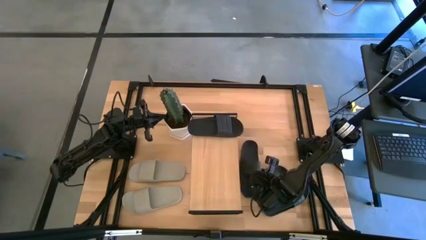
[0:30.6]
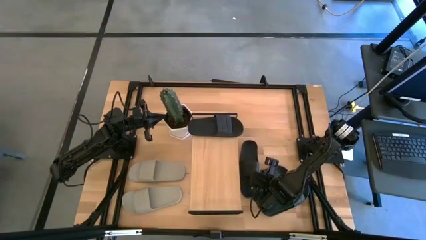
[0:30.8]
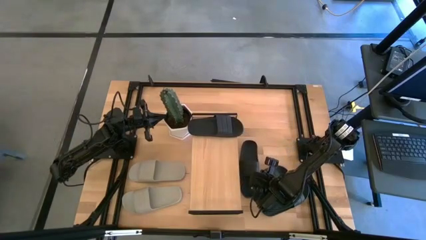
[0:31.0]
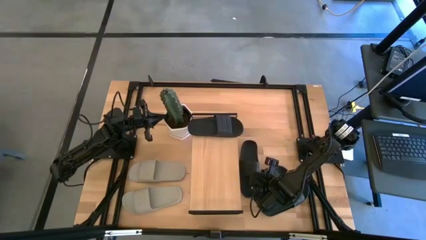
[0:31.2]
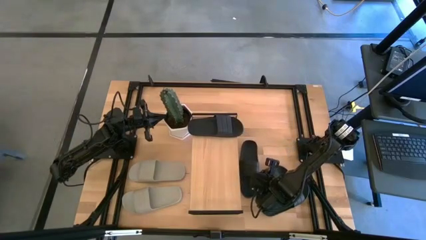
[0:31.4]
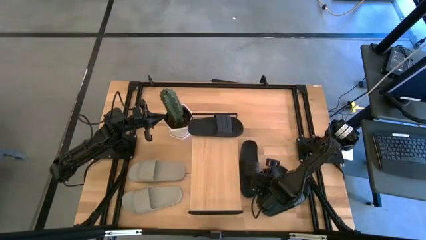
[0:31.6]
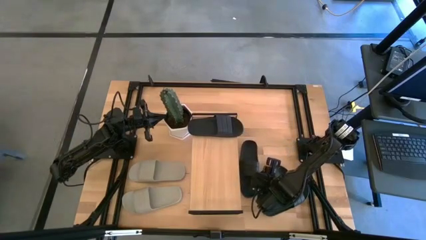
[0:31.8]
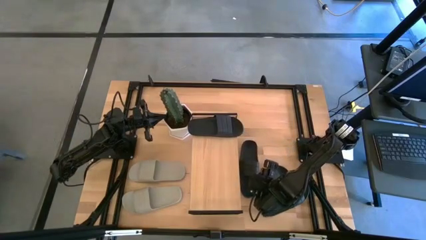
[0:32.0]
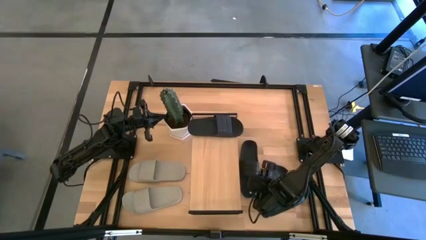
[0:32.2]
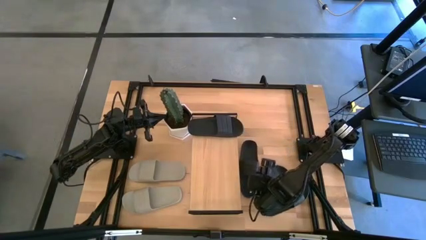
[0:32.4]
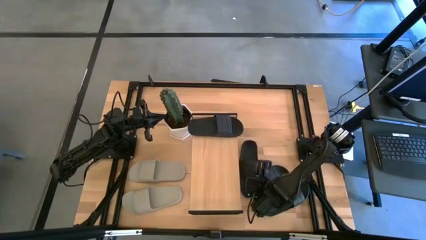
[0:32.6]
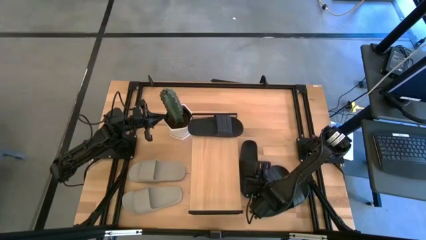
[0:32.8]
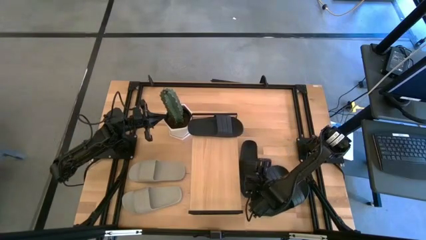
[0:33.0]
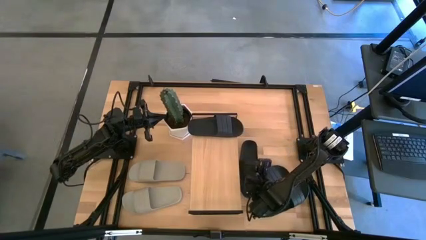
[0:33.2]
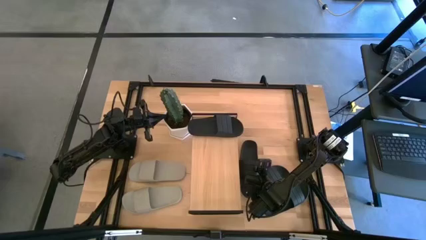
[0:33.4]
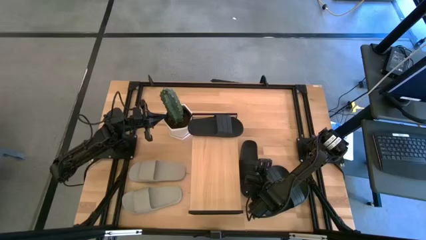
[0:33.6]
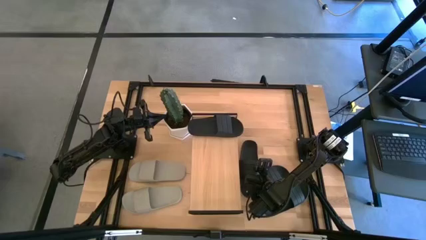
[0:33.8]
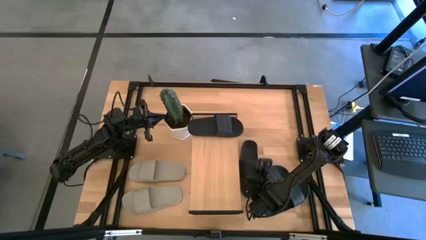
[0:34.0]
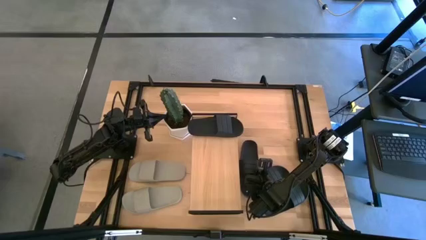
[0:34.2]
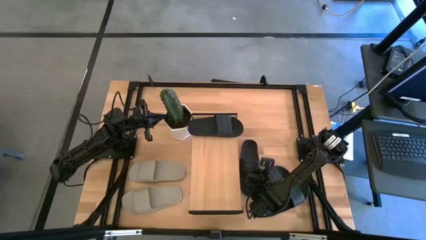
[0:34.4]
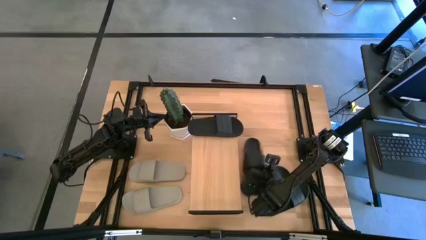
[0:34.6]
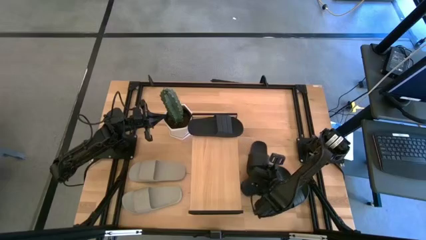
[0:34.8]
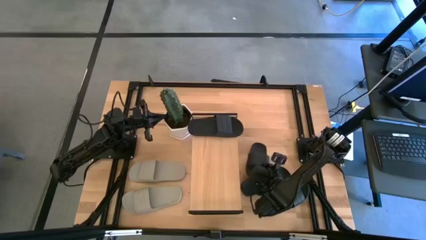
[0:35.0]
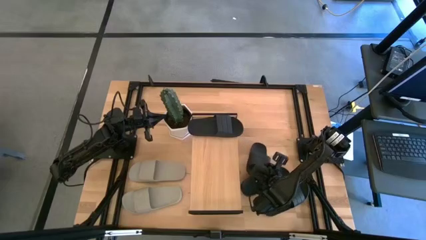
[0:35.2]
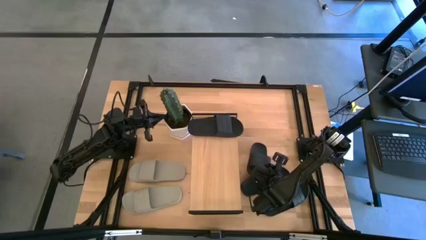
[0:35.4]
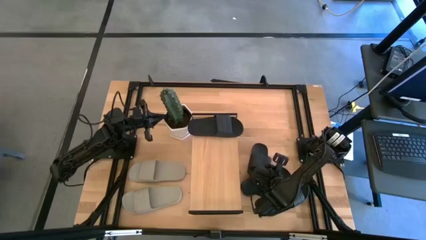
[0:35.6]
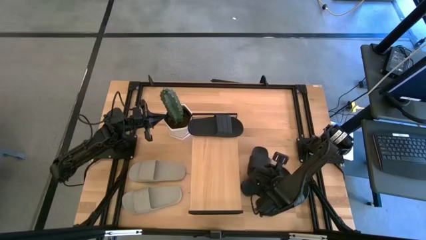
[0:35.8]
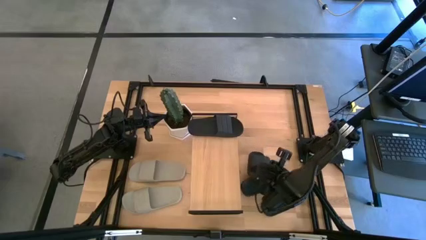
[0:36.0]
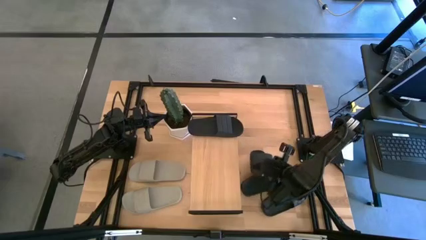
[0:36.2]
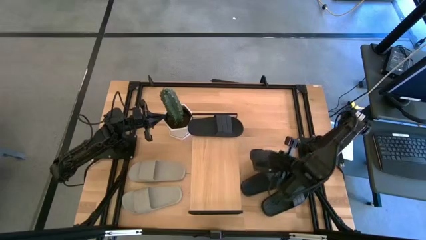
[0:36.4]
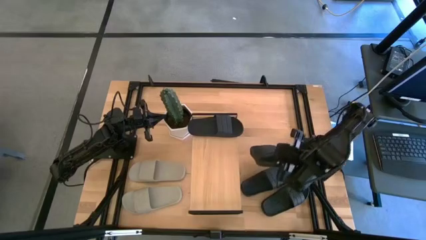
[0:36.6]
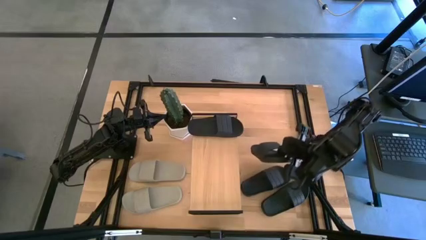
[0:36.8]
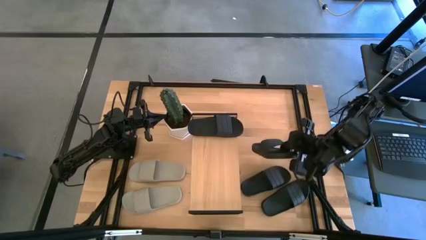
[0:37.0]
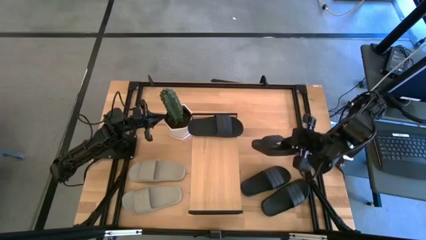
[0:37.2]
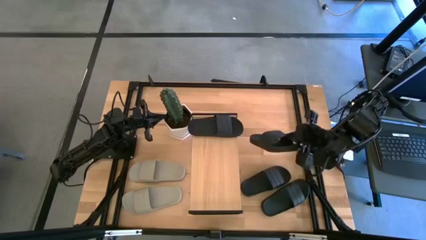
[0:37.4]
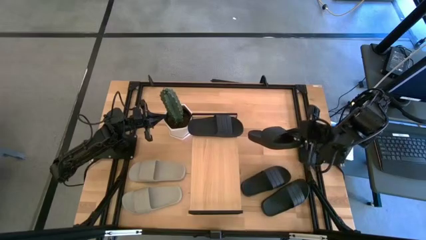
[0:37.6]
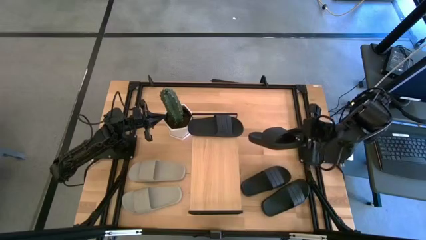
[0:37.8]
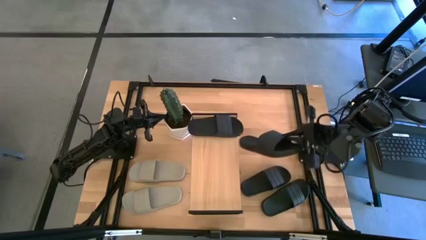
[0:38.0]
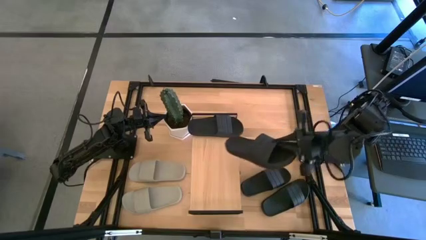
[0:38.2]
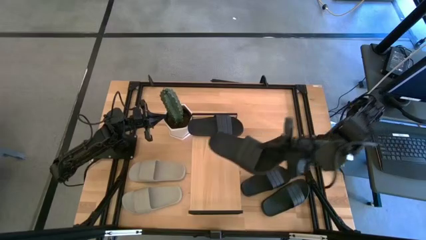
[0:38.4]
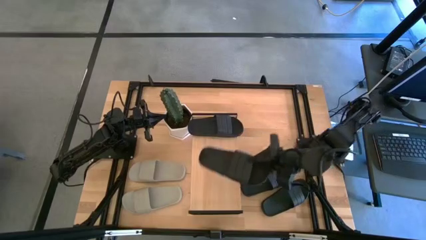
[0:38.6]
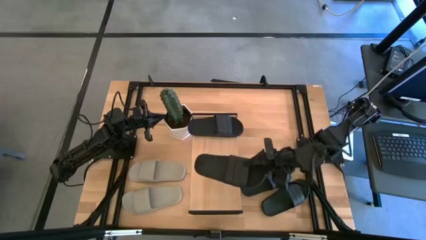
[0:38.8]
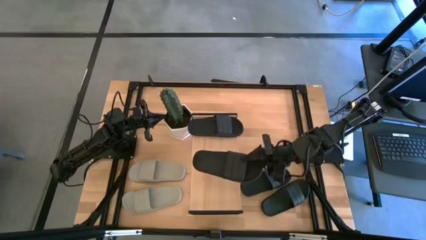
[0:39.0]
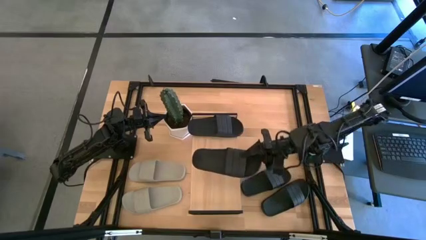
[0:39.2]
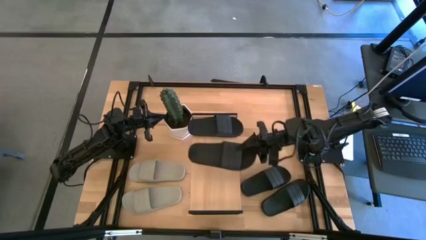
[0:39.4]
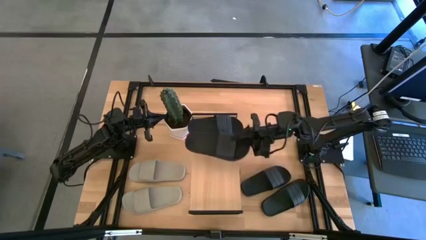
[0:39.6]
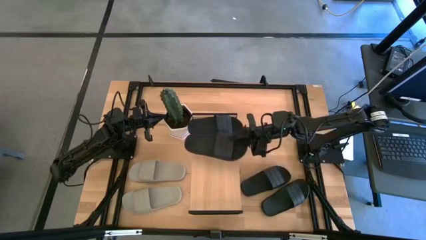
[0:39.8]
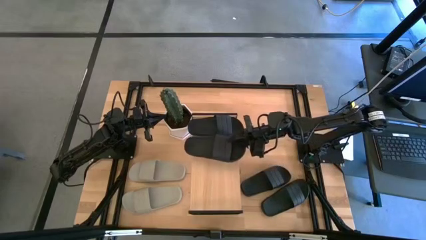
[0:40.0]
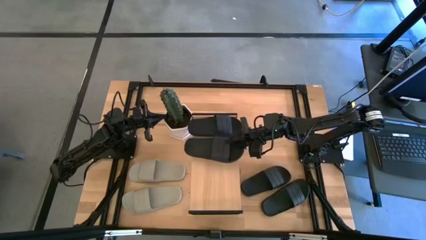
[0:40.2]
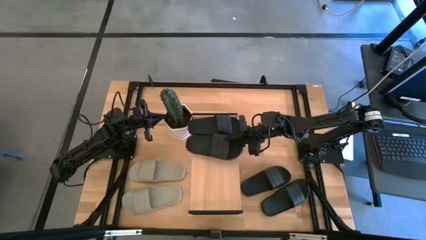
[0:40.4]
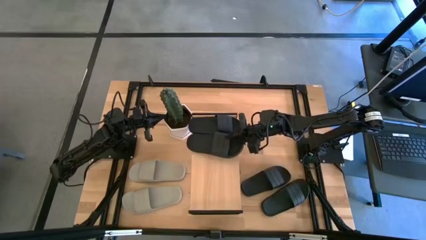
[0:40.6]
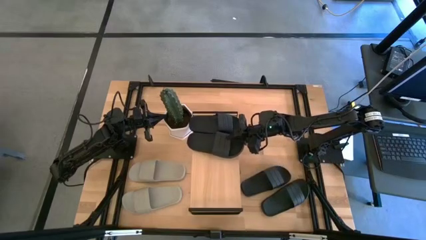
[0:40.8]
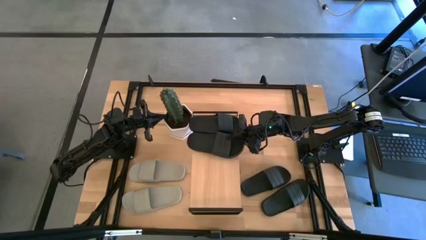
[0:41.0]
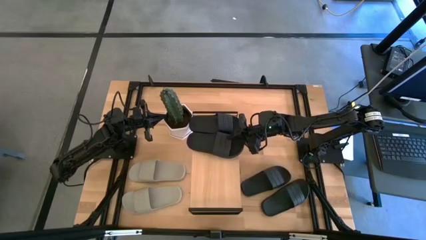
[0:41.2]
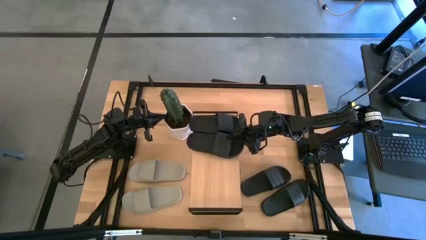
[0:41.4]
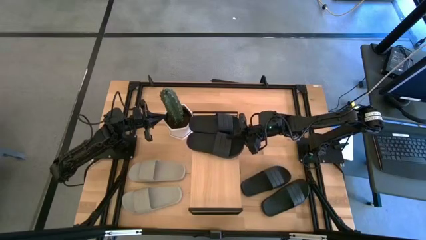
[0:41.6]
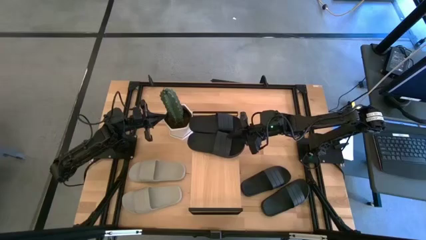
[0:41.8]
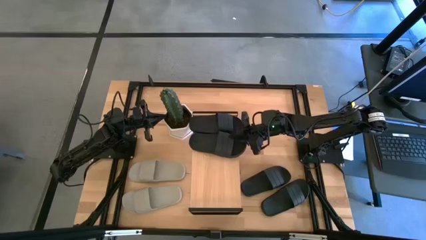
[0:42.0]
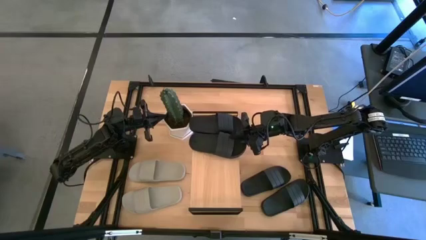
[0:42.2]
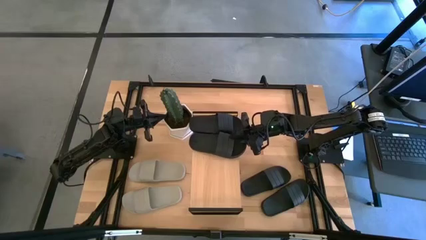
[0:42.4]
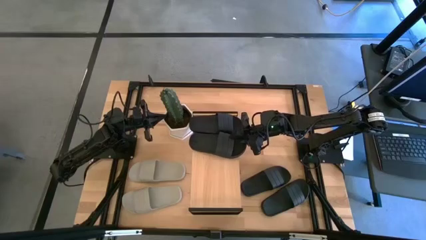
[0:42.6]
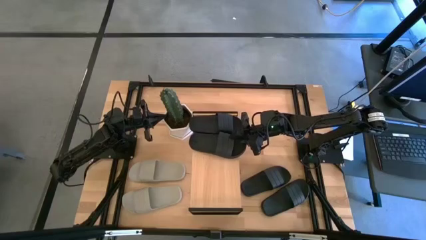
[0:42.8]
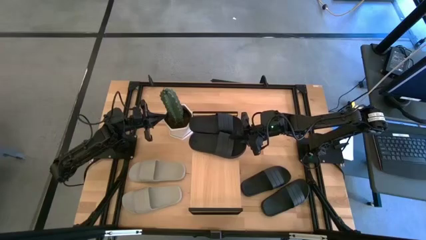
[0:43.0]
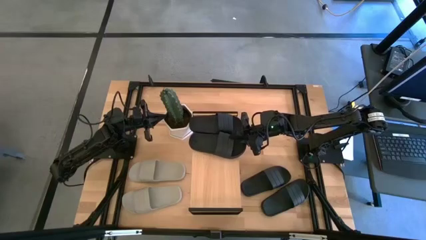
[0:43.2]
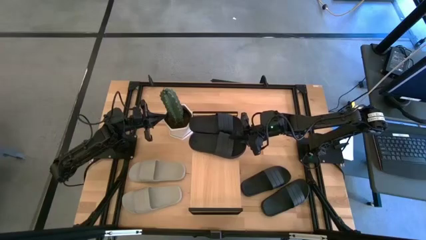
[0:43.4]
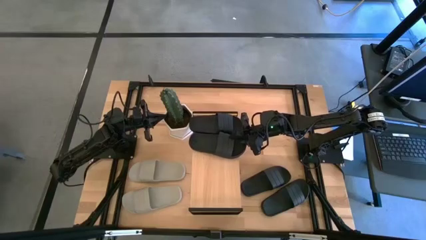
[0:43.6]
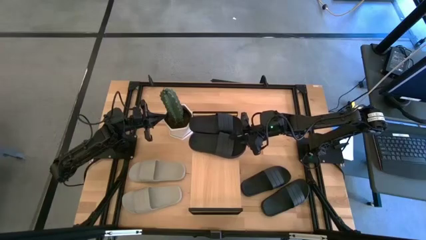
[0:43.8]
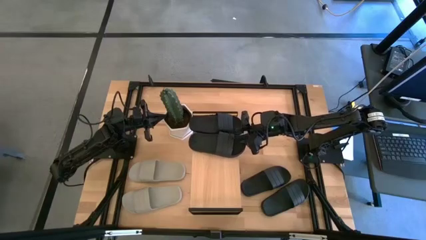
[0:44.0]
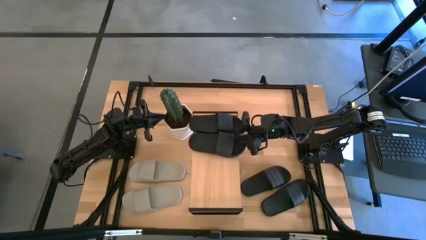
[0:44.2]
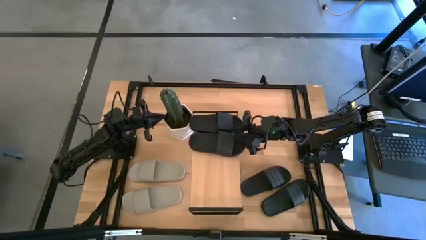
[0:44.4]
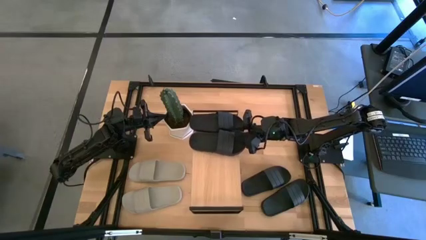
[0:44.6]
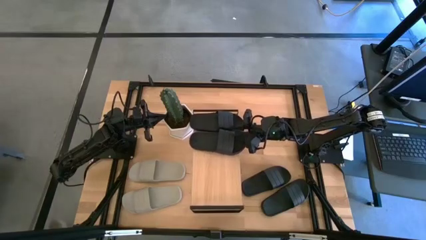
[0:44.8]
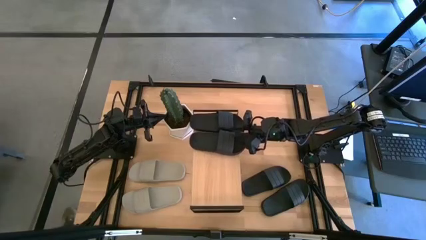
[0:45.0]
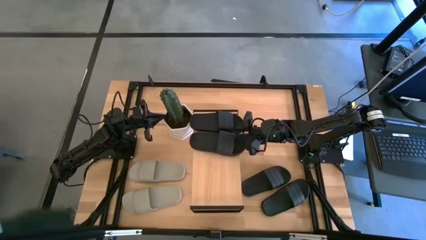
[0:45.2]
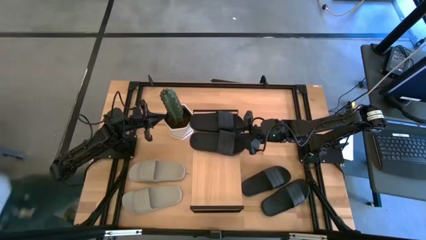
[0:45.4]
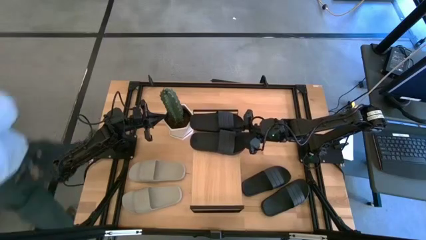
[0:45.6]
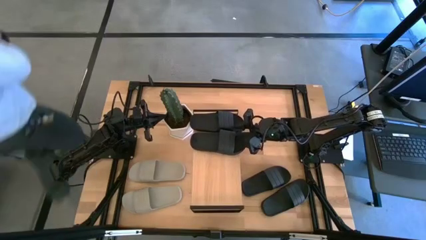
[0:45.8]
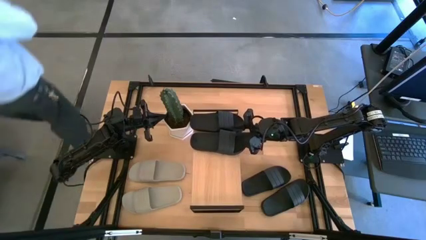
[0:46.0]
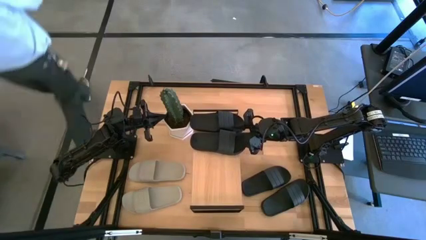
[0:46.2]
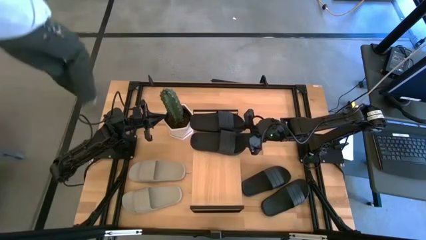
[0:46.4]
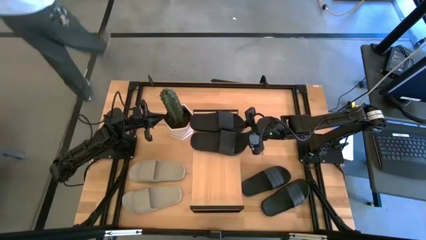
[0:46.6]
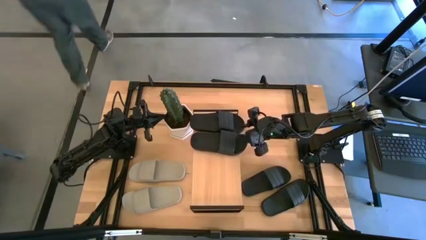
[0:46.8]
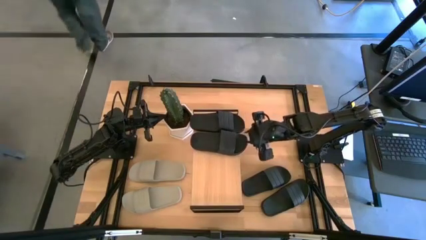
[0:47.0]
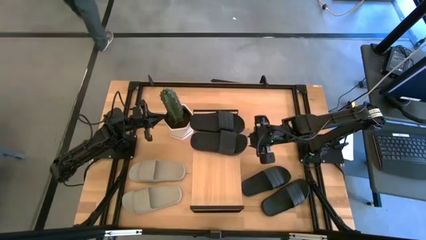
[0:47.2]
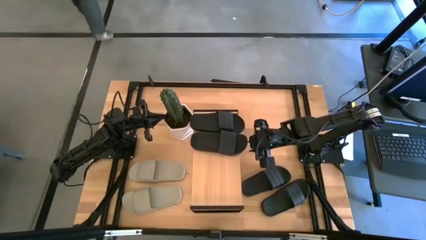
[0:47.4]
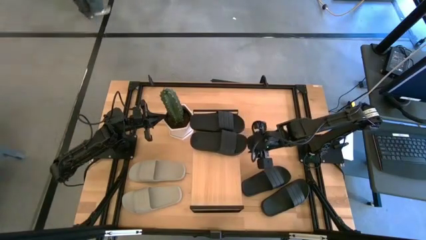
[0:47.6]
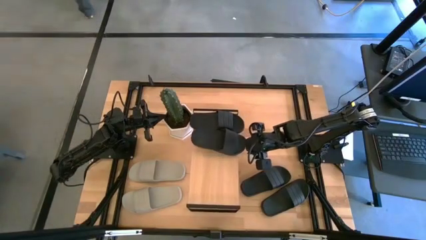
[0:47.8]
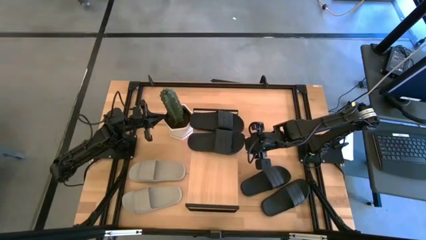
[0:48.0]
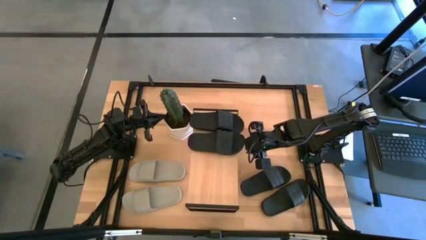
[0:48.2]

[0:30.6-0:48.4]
Task: Pick and place slides into the shelf
Put the black slide on the shelf
